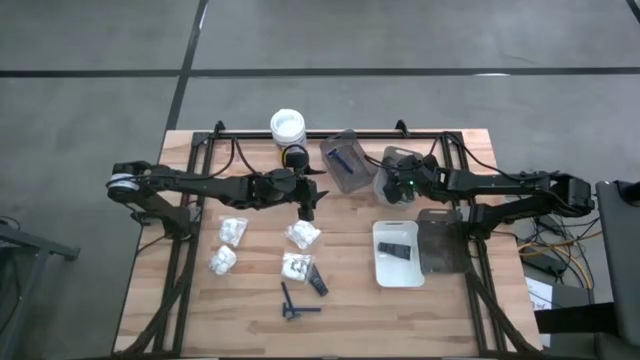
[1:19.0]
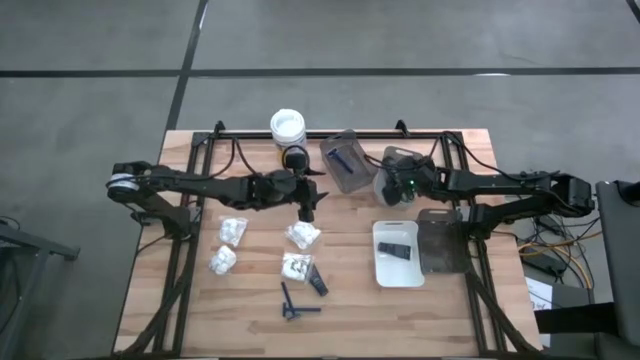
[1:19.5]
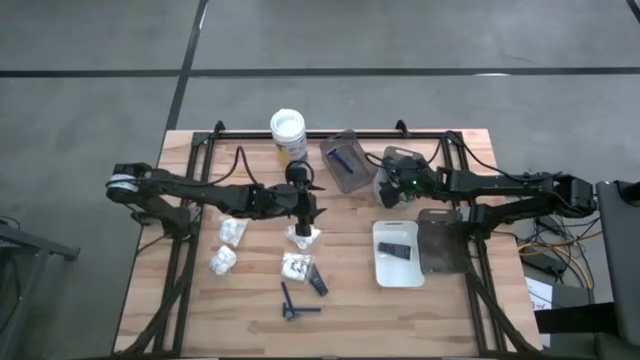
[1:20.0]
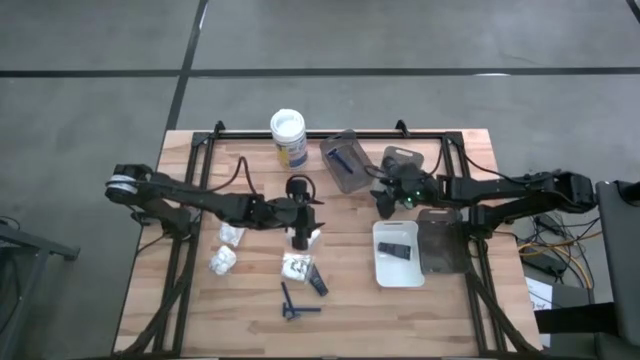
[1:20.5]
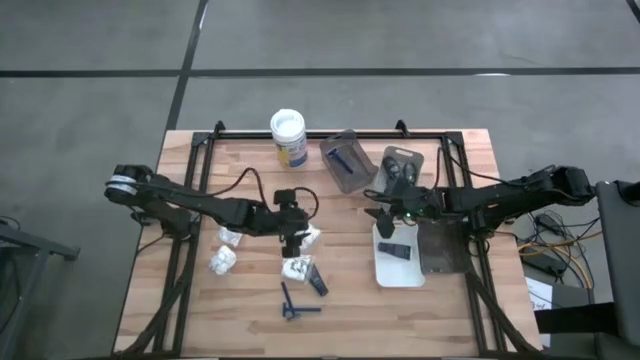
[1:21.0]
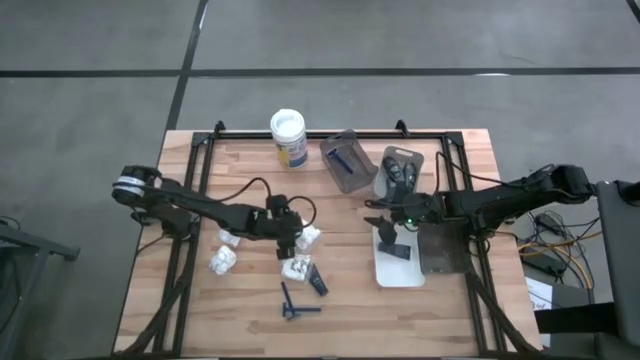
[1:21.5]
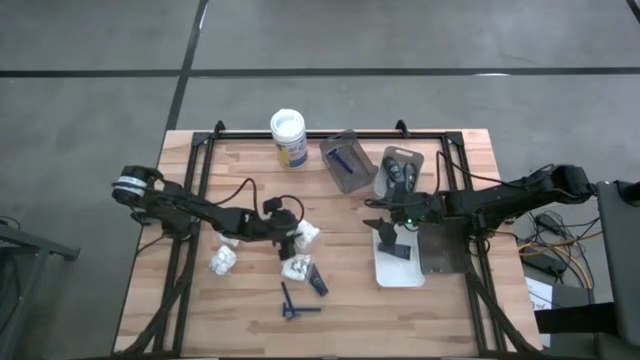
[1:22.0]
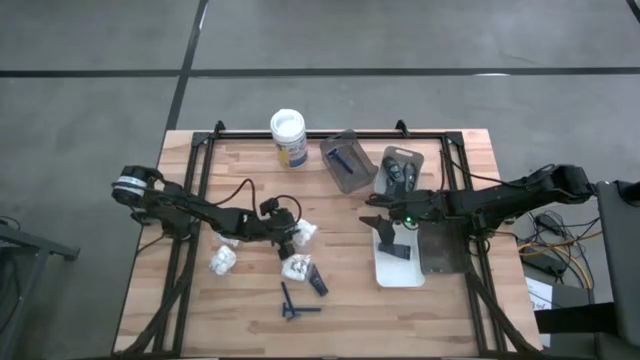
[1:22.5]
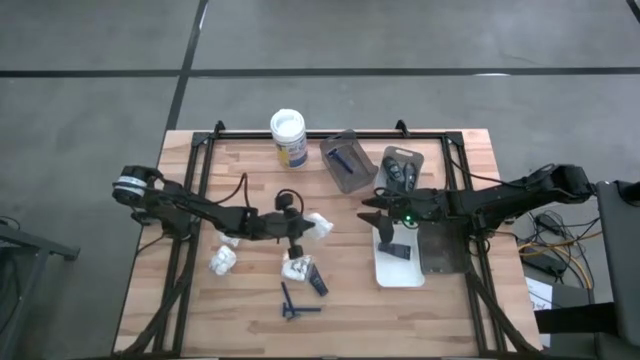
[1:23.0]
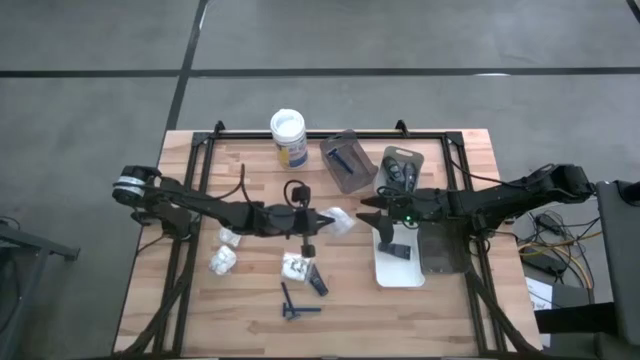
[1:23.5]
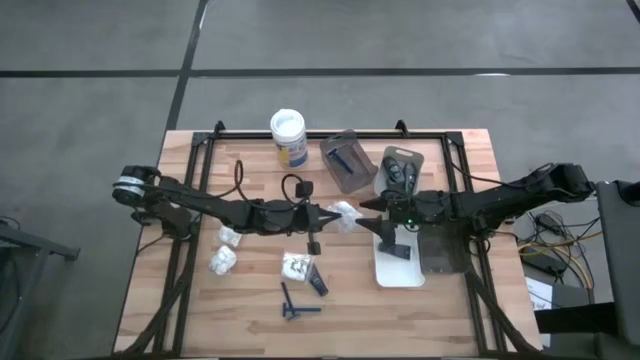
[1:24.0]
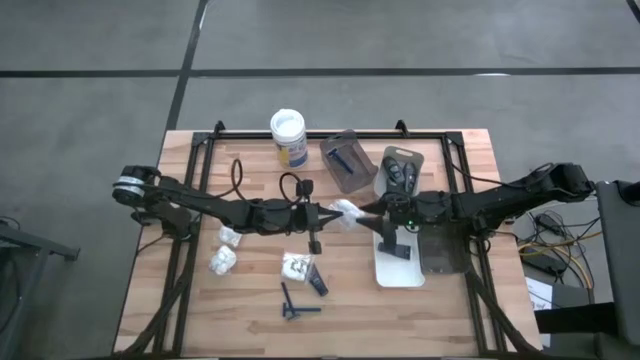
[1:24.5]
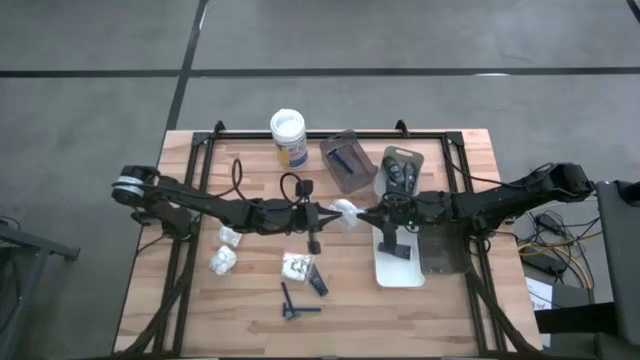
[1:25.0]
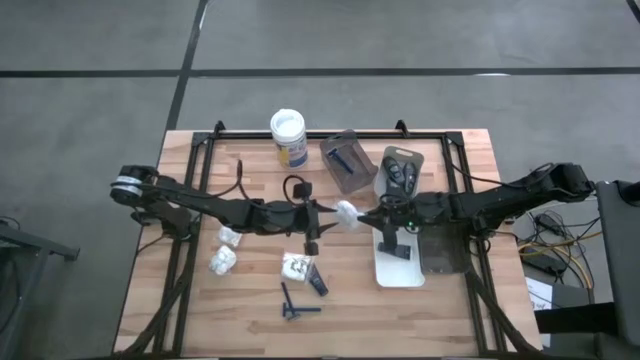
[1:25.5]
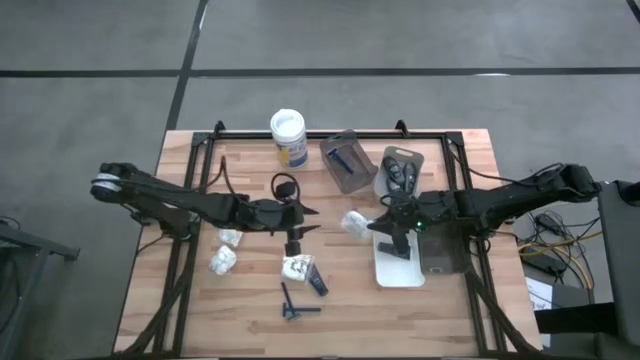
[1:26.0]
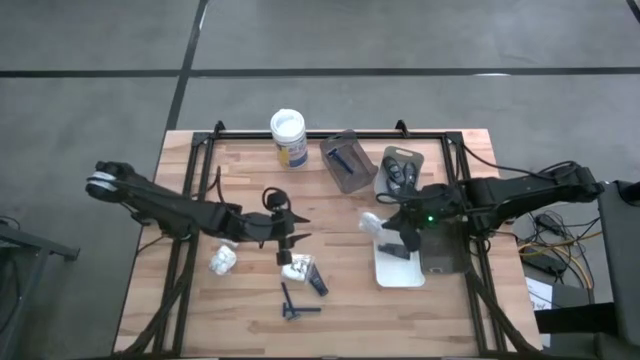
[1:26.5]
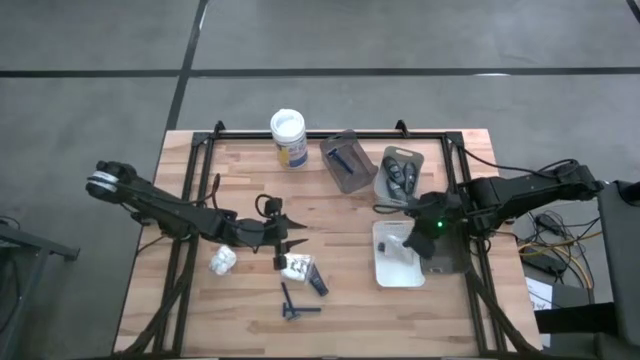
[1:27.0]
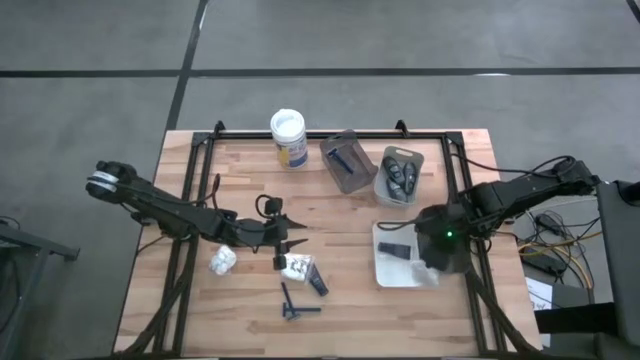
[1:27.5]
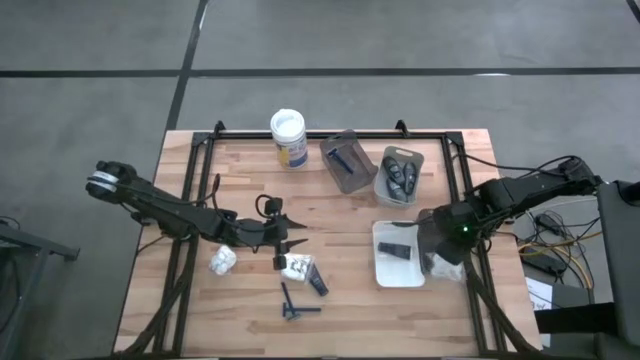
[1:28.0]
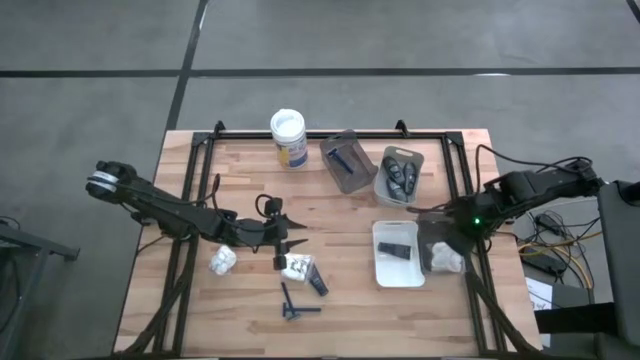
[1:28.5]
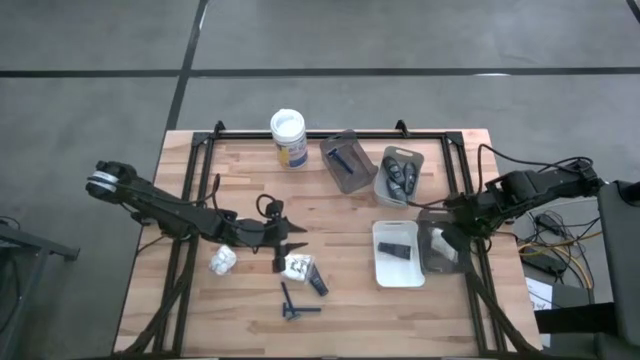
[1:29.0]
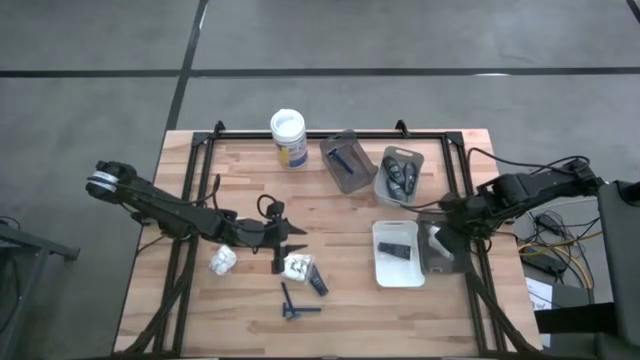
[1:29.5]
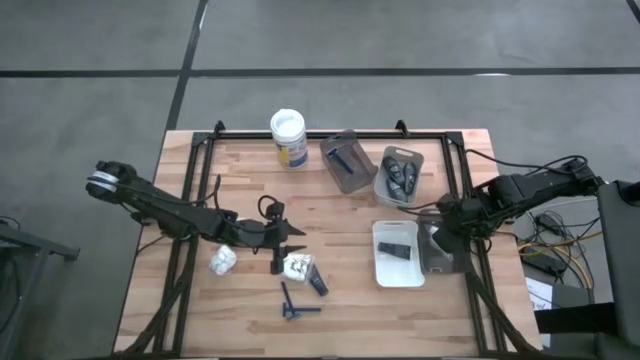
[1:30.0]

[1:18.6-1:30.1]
Task: Pick & Place Travel size toiletries
Put the white cotton pack into the bottom black bin

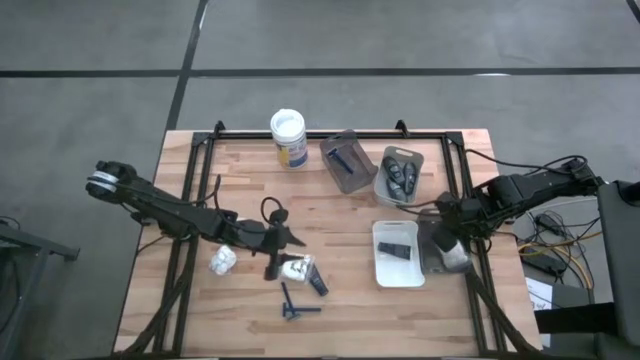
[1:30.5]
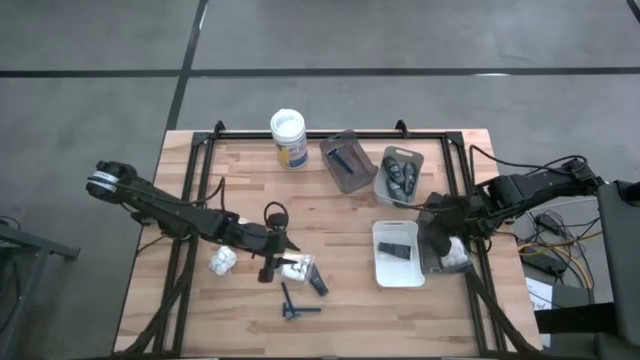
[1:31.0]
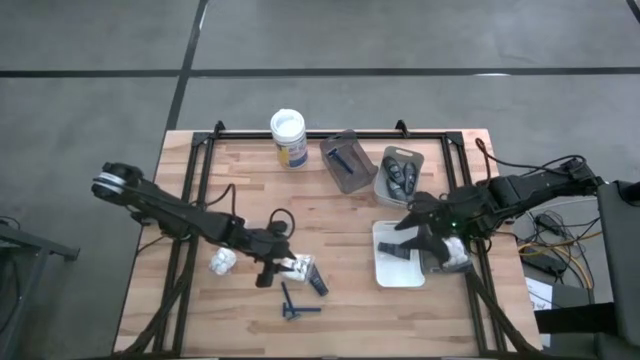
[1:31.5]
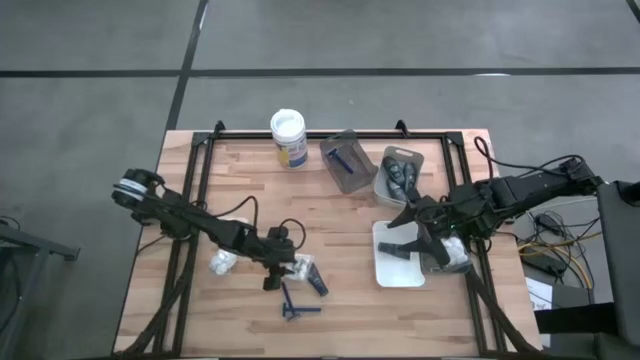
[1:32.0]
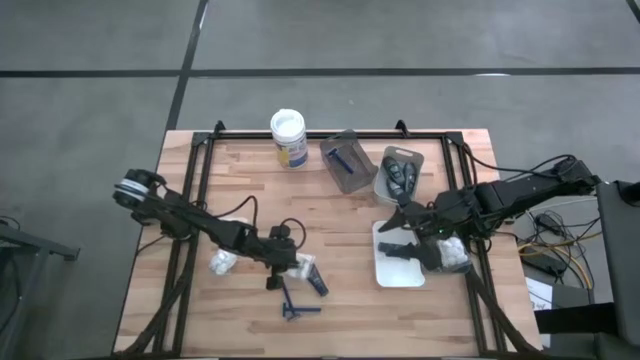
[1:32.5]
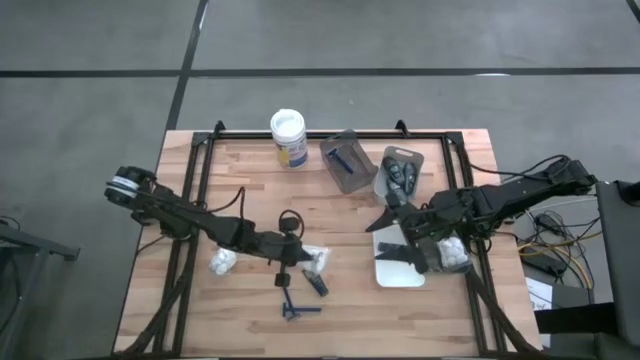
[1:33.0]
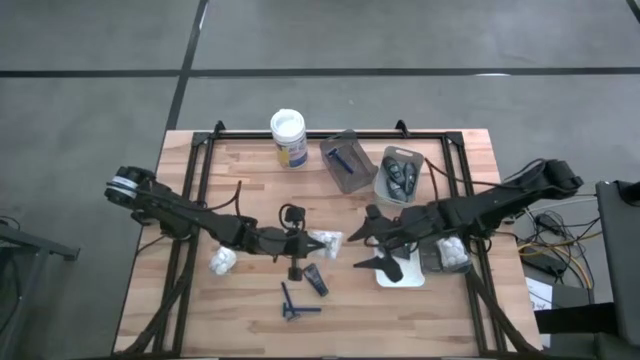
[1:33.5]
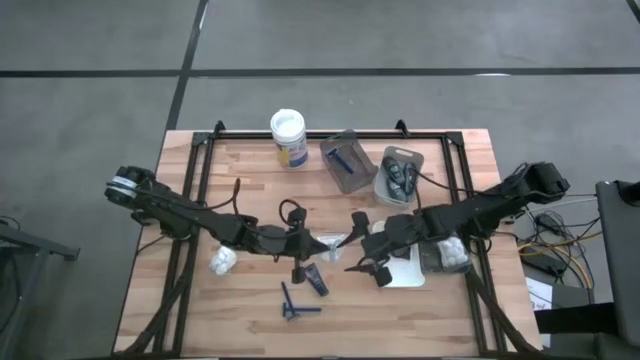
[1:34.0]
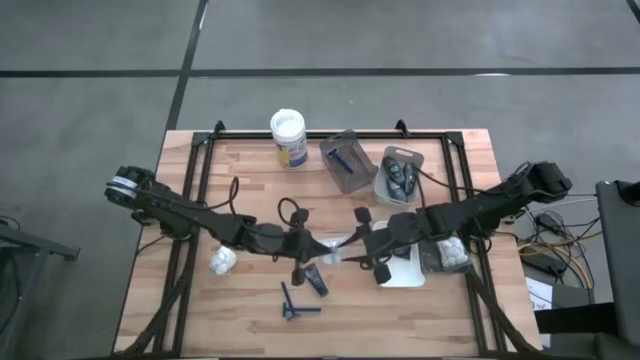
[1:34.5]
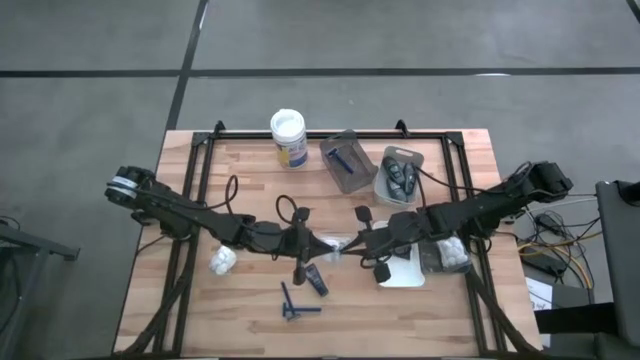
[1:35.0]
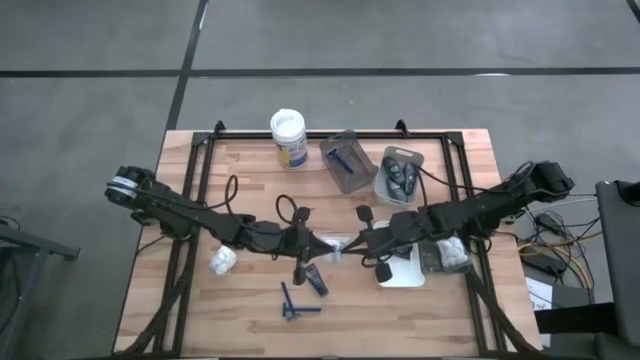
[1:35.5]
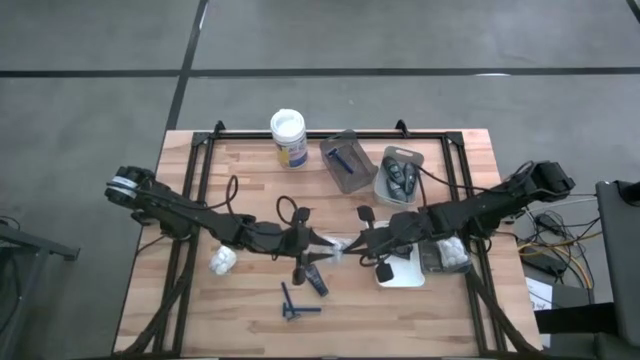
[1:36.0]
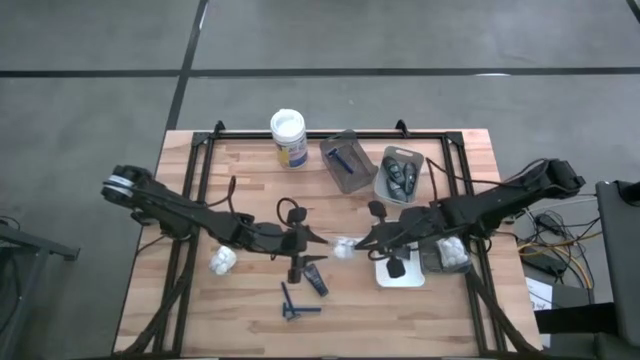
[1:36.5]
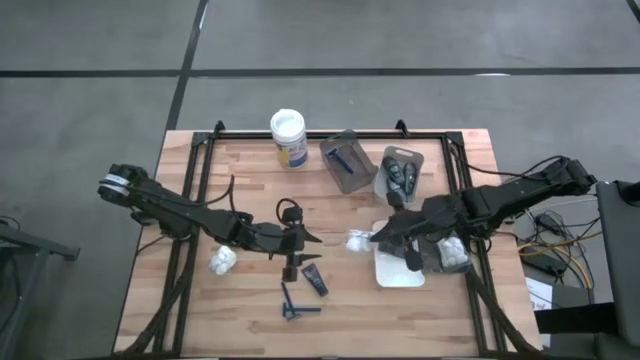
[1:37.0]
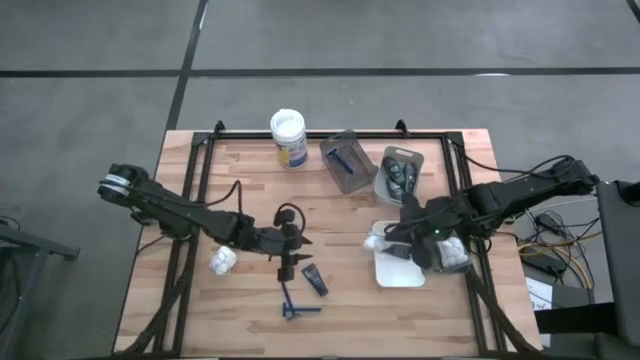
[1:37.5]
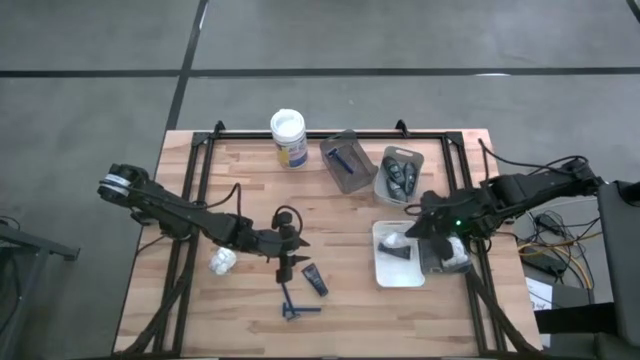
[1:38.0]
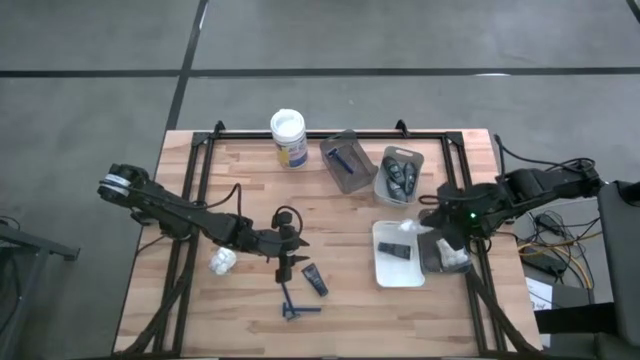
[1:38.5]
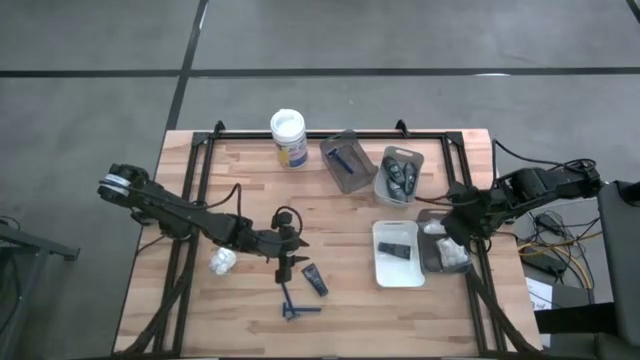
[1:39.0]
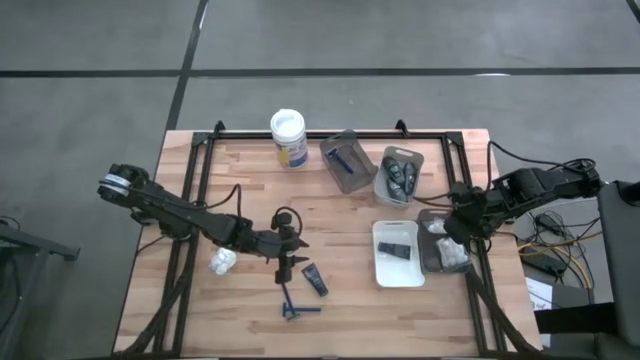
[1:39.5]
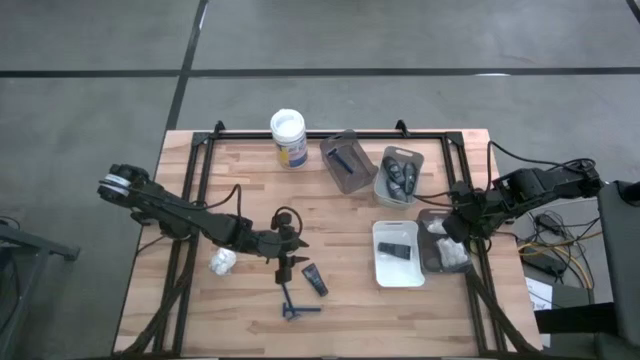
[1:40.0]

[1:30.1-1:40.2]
Put the white cotton pack into the bottom black bin

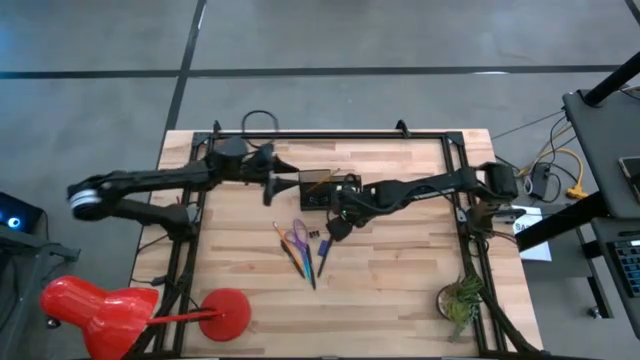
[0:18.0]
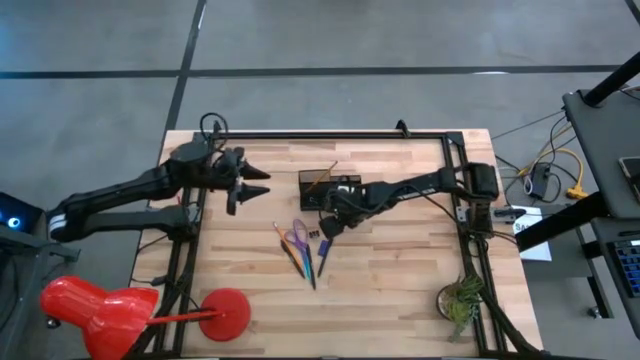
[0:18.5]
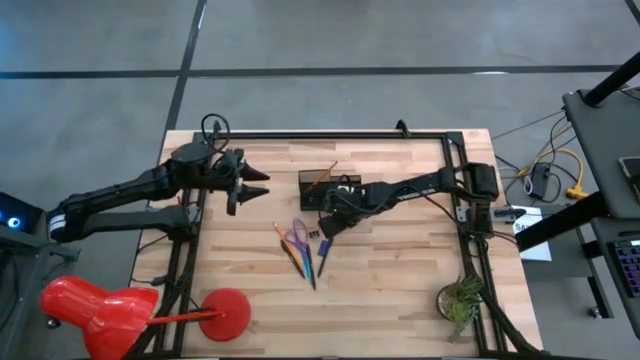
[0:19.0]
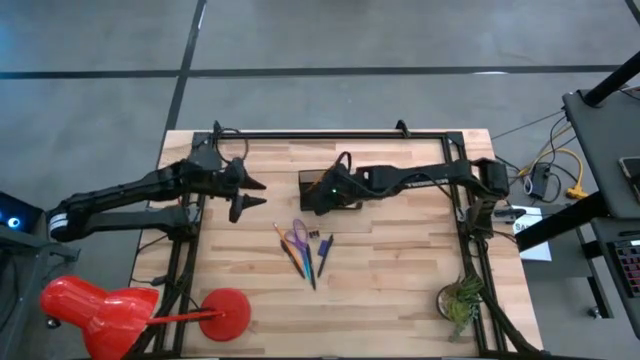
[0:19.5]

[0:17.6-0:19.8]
Task: Pick and place office supplies into organizer
Put the middle right black binder clip into the black desk organizer
